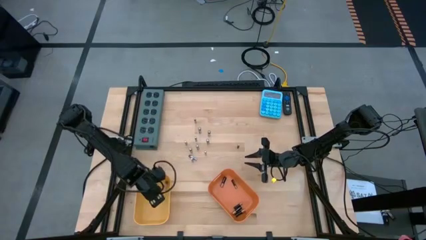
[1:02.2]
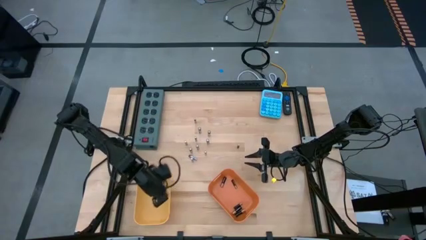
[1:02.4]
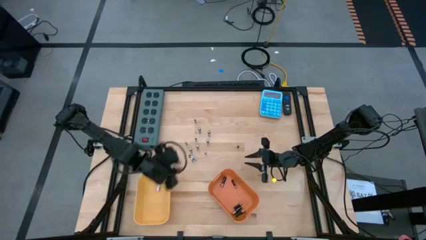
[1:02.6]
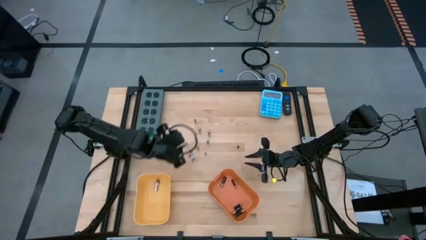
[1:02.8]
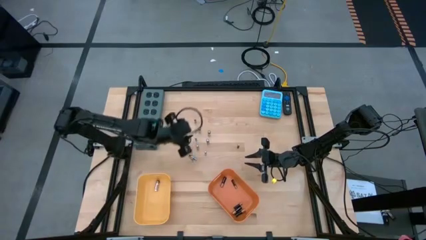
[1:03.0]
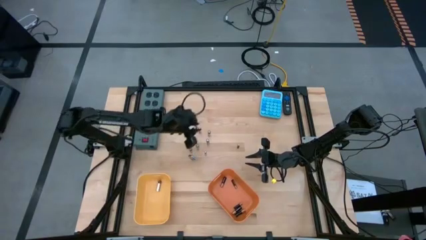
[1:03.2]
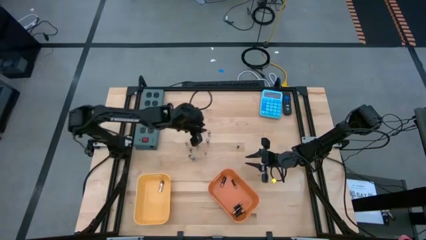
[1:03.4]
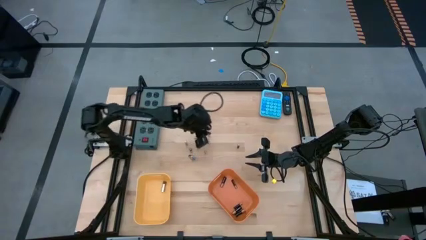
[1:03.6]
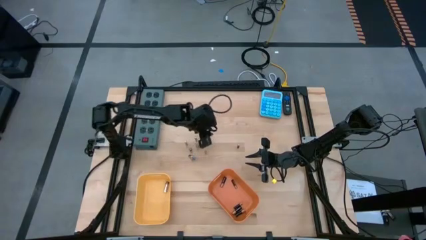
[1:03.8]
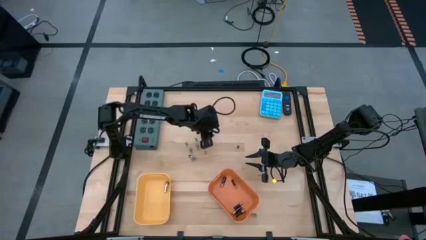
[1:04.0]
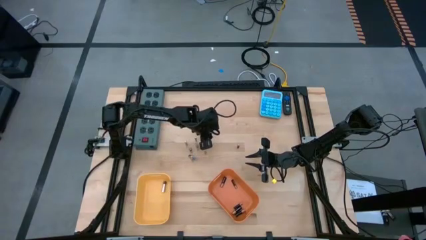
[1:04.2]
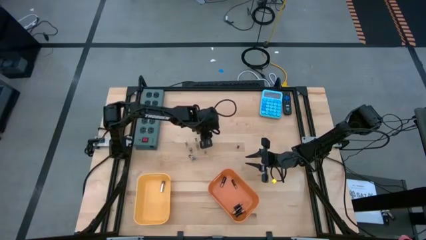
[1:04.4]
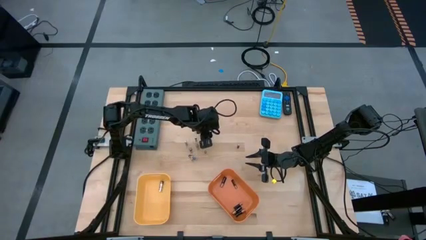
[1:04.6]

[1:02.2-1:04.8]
Task: Sort batteries
Put the silver battery into the yellow bin

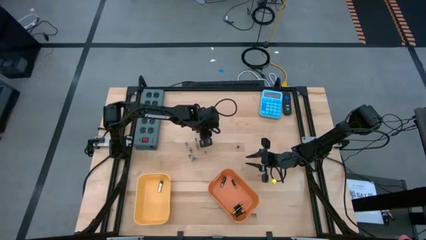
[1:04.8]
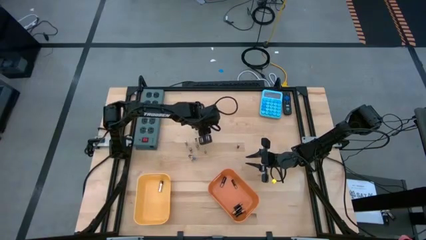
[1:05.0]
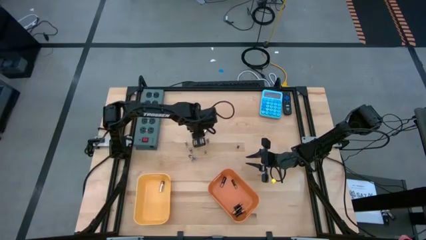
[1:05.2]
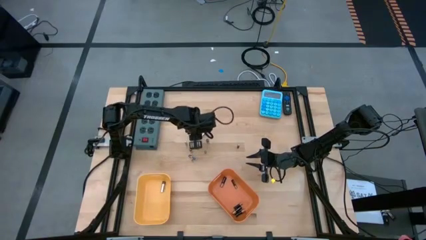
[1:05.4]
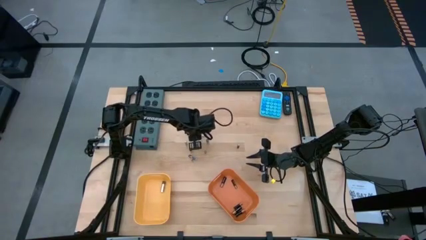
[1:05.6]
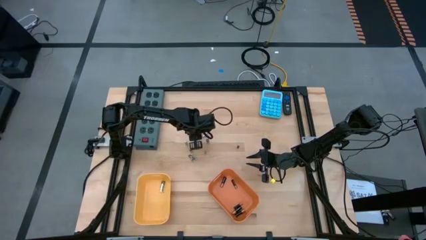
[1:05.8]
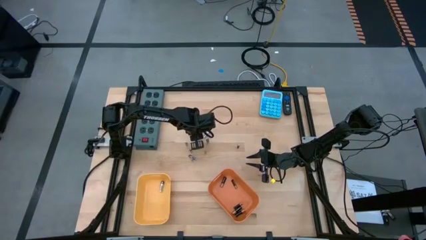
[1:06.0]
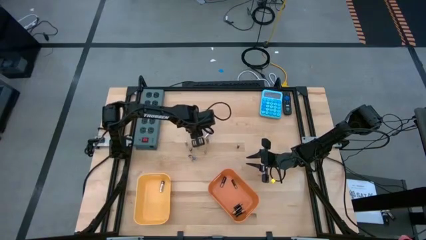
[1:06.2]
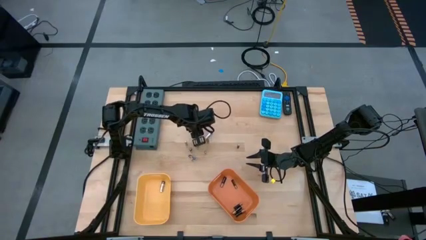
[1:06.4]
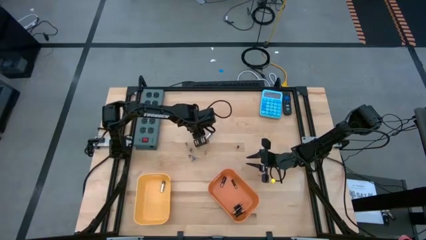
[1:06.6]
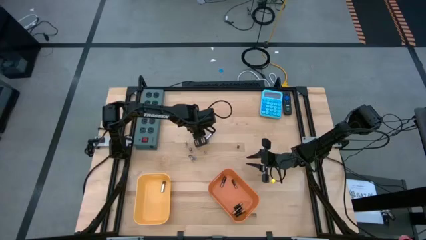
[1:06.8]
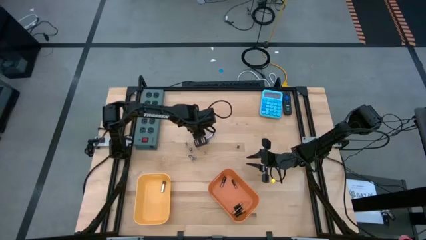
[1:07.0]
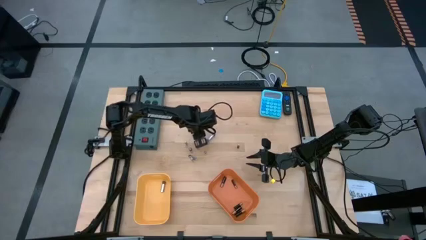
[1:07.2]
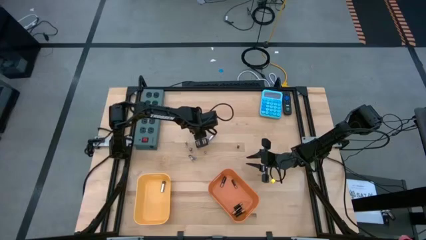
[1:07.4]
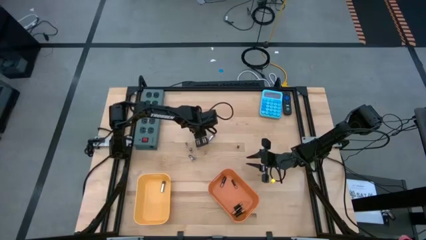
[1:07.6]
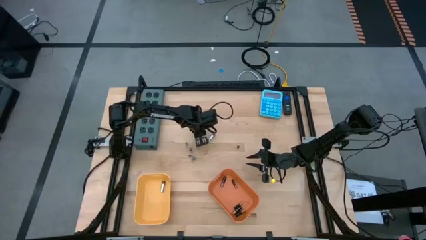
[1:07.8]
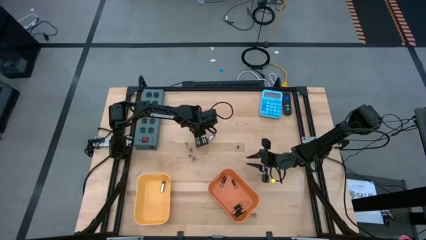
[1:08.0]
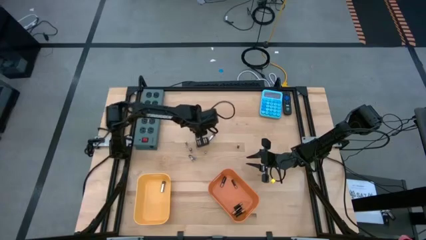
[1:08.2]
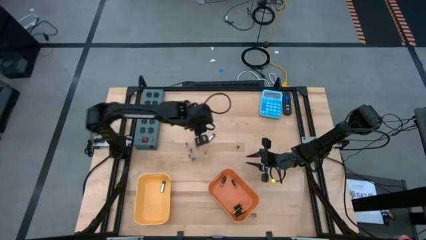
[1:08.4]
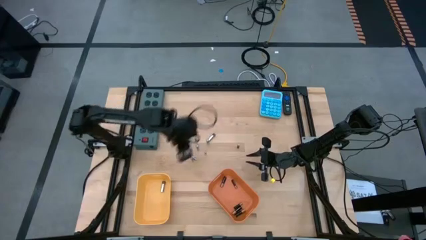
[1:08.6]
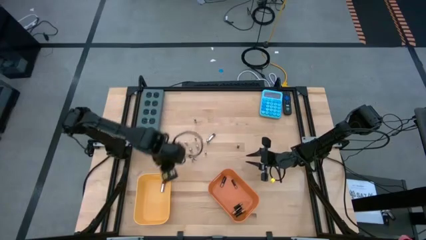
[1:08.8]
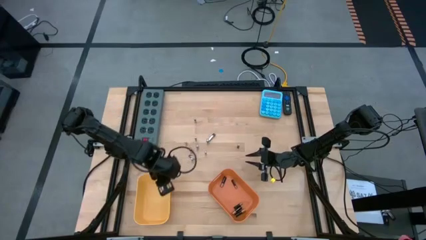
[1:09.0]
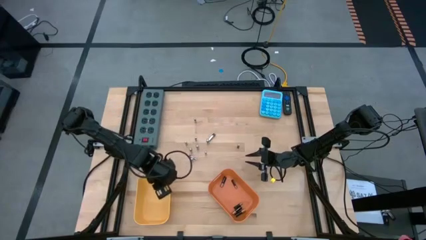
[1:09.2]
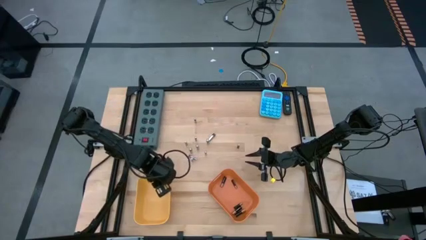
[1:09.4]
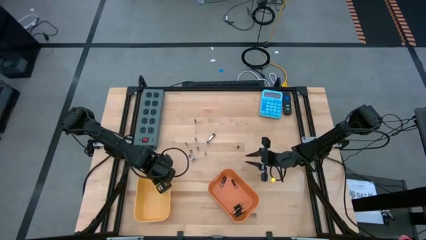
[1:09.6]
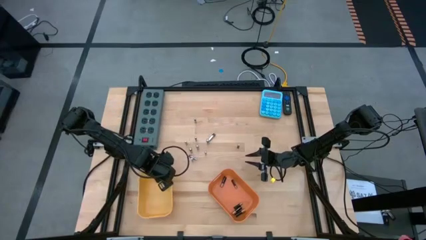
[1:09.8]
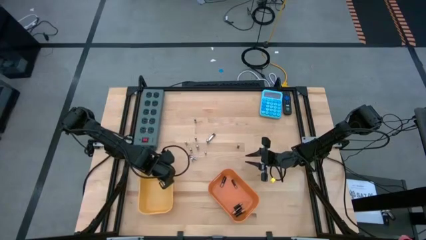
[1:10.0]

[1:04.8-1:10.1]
Put the silver battery into the yellow bin

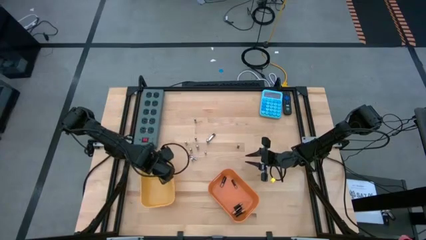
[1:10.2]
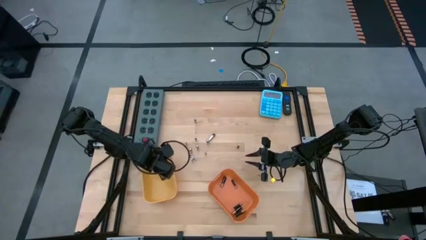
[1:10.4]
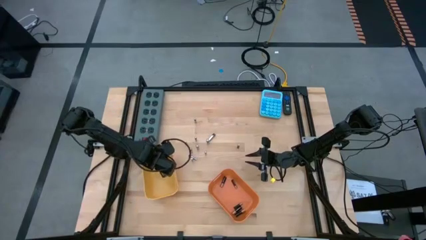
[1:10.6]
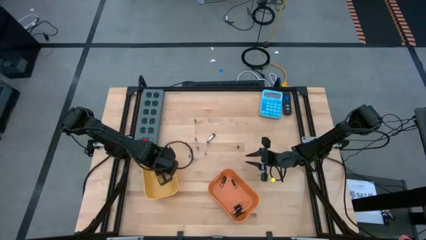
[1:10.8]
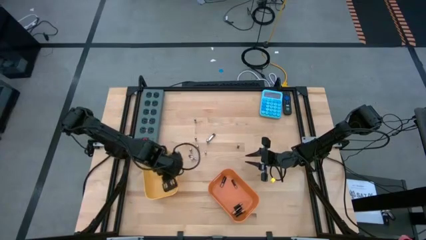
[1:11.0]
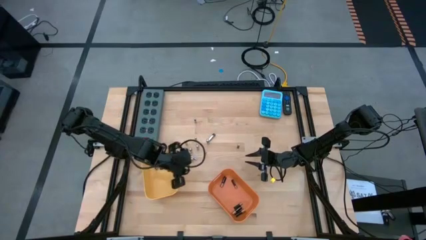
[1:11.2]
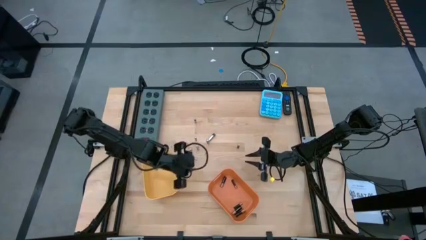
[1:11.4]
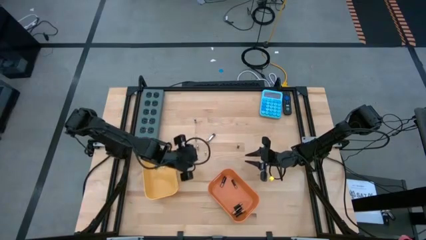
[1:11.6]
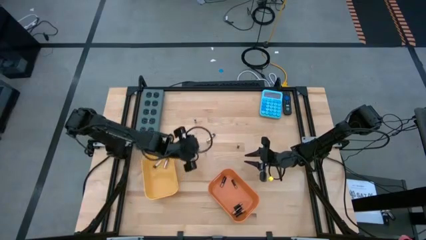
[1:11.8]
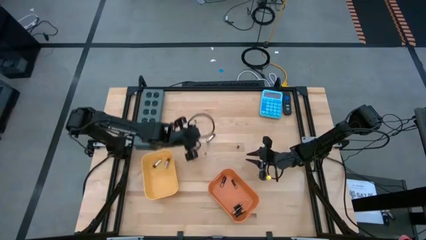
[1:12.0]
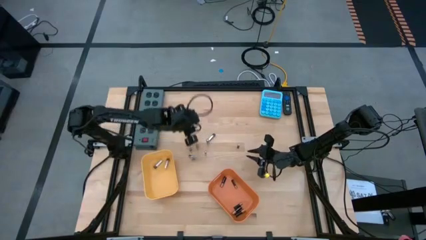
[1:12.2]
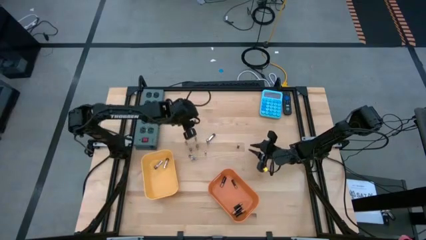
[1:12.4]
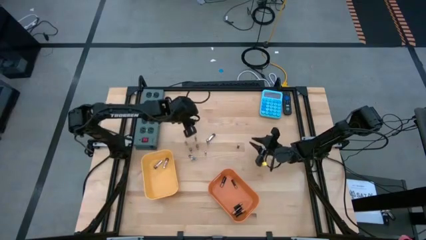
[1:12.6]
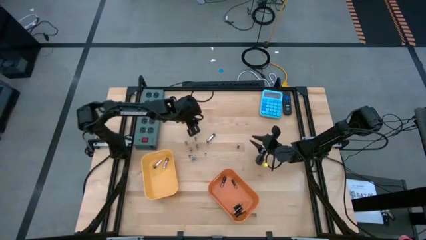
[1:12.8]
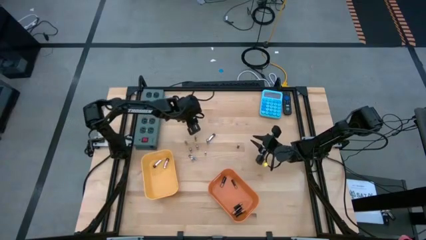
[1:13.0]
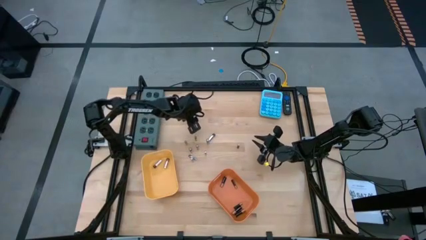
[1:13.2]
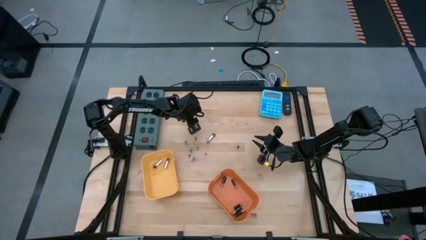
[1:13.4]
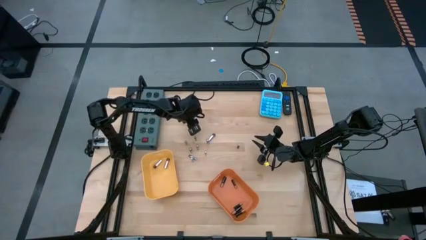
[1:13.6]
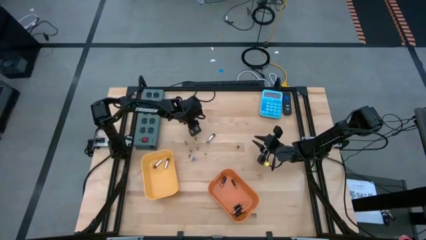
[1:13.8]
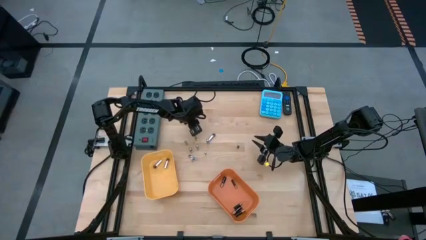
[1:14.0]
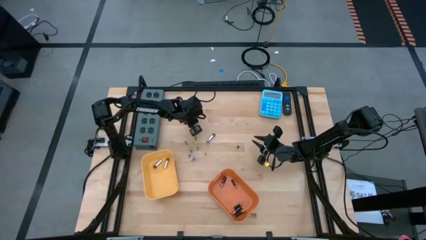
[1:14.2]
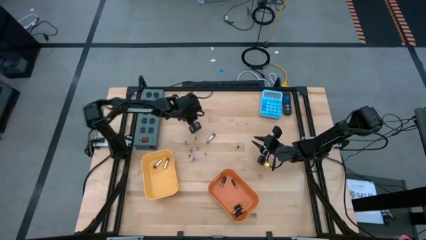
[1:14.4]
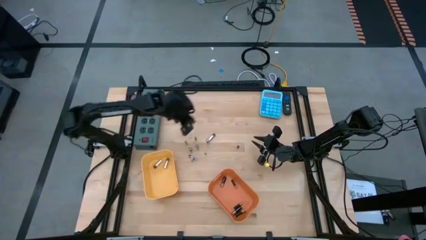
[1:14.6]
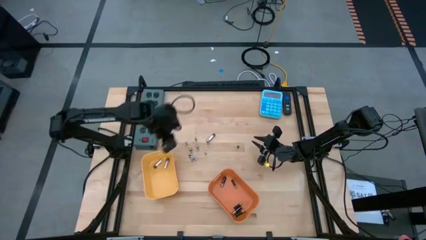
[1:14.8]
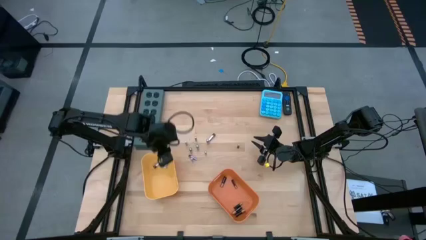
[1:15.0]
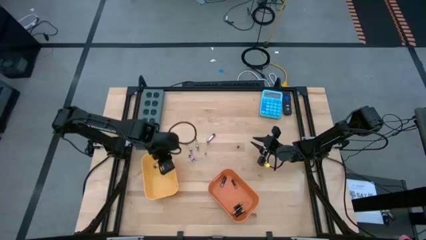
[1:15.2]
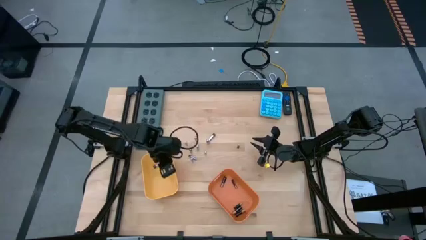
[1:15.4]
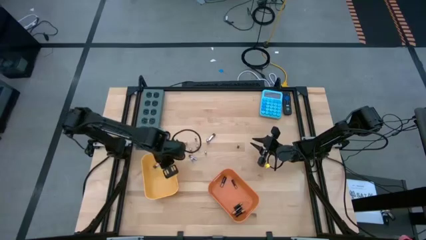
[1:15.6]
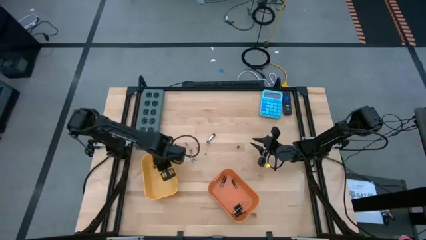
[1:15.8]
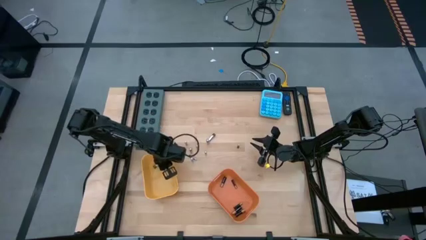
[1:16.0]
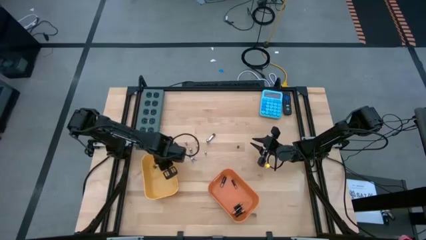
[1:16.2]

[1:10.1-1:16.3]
Put the silver battery into the yellow bin

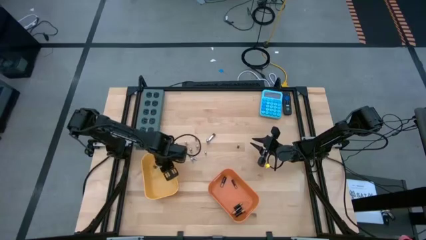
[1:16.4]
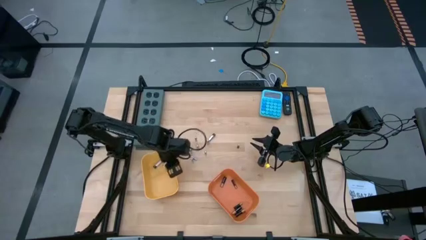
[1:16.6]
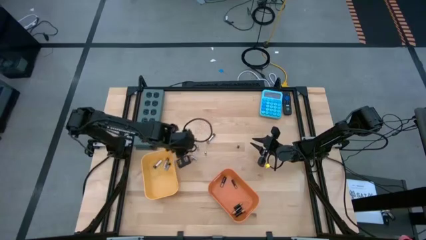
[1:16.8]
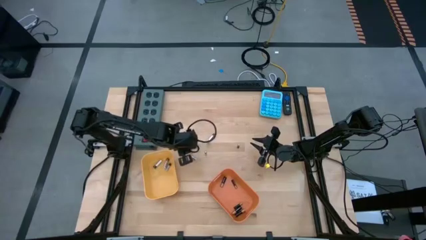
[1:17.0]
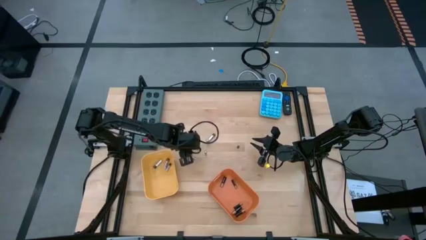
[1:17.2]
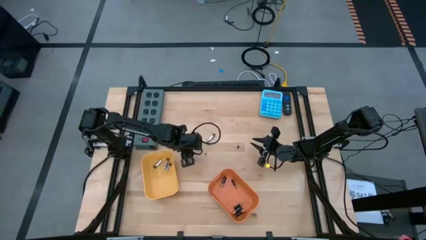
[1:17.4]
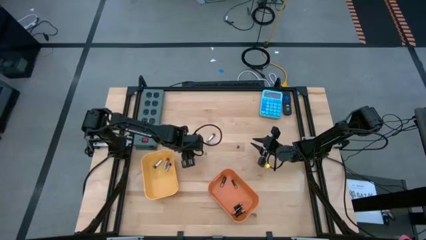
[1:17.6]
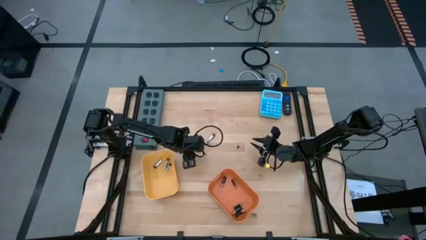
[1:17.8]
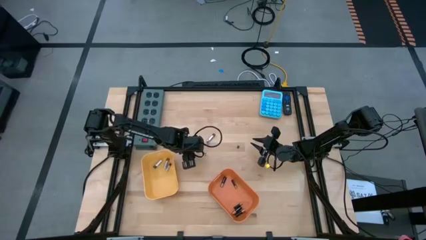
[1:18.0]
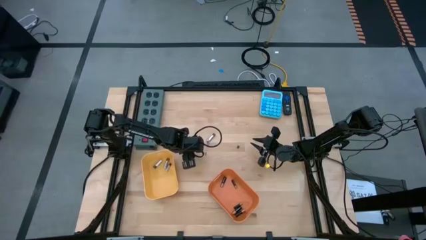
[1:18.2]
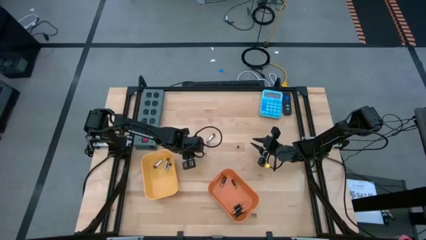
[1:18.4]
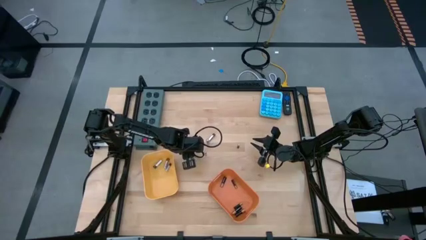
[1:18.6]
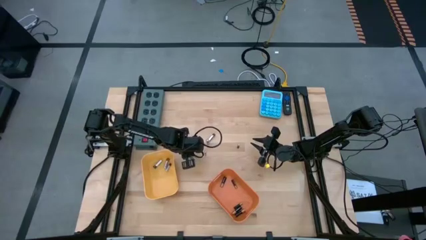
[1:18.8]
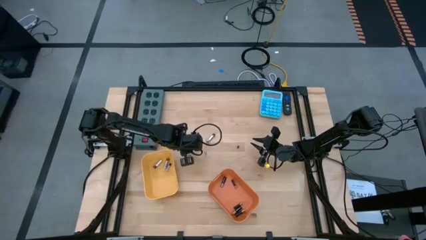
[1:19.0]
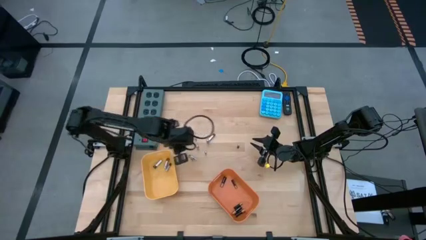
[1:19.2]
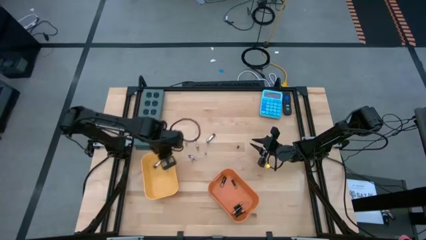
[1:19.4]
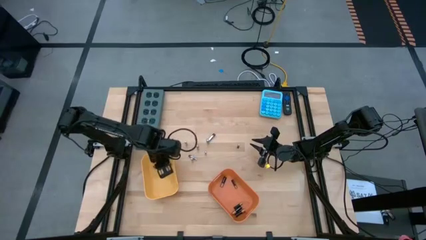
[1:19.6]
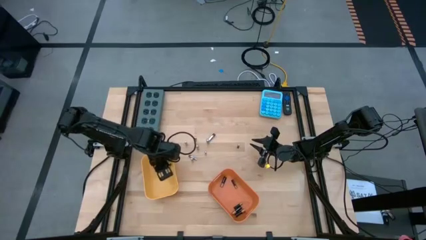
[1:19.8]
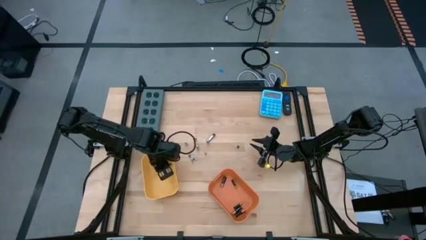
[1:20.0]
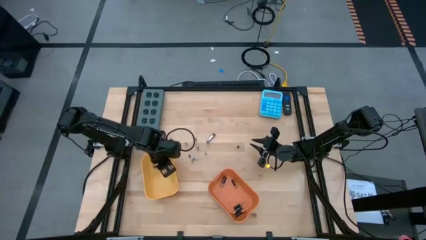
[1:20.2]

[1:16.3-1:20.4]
Put the silver battery into the yellow bin
